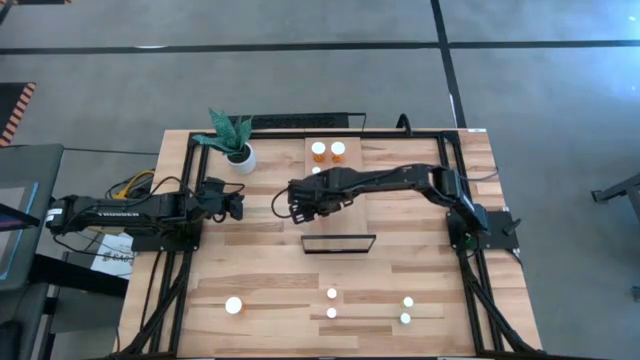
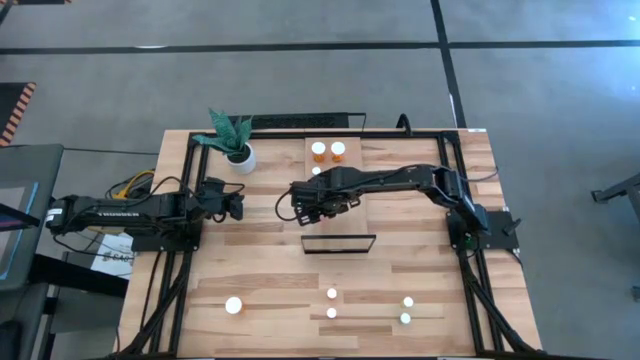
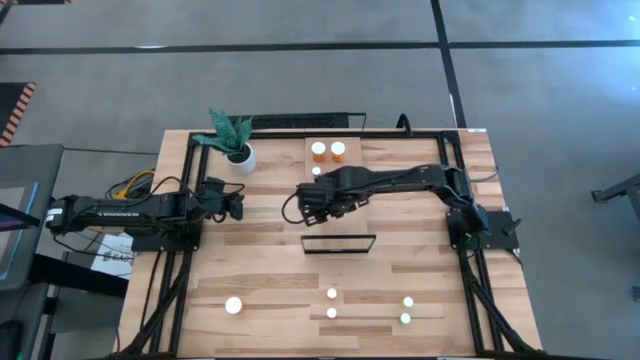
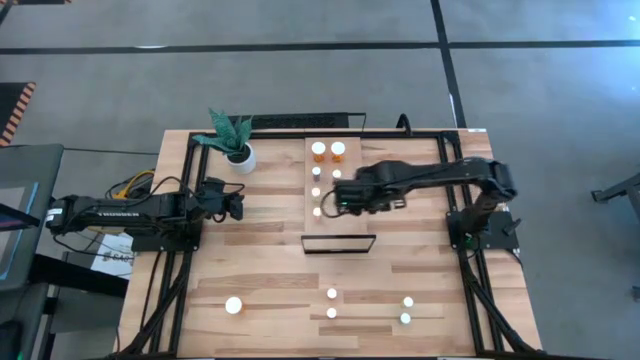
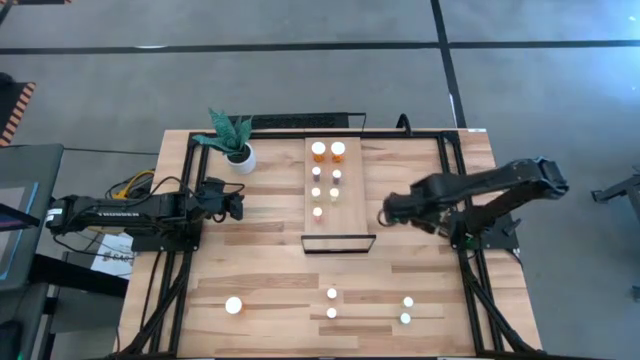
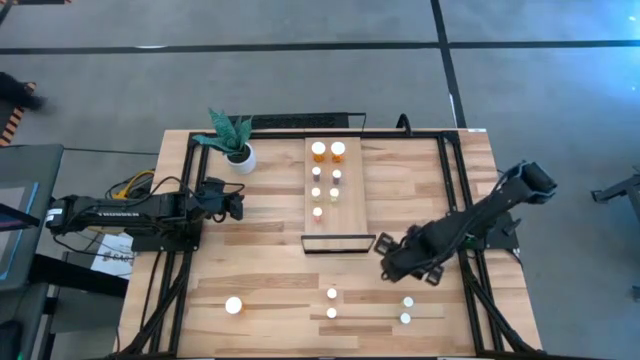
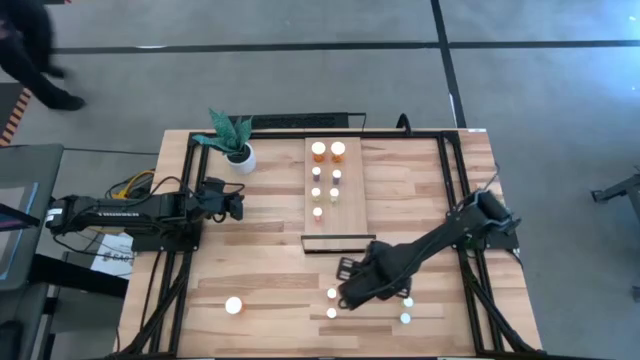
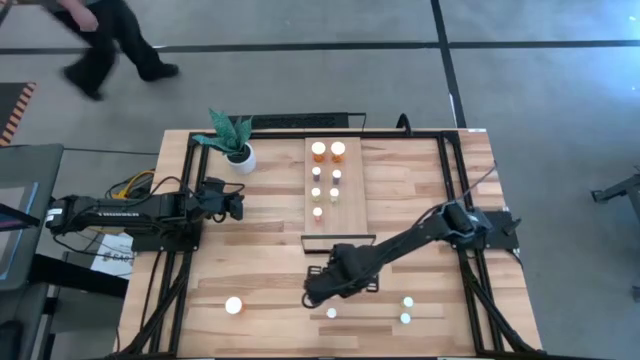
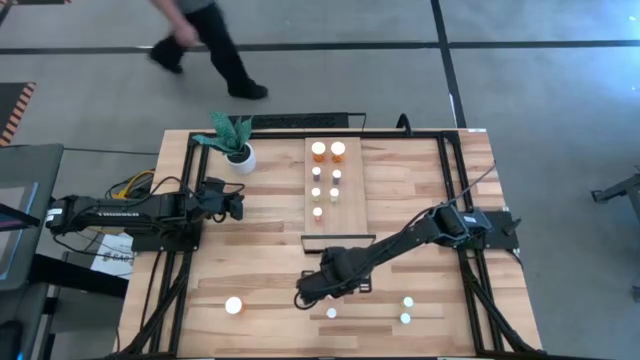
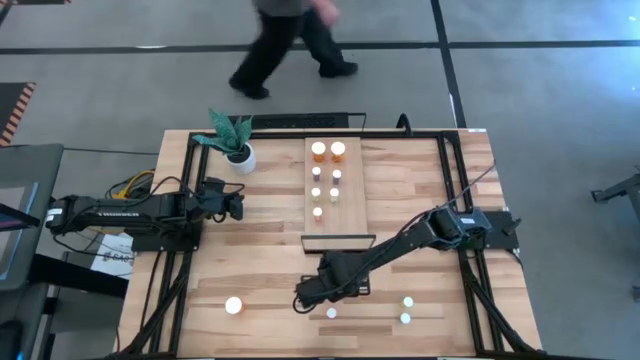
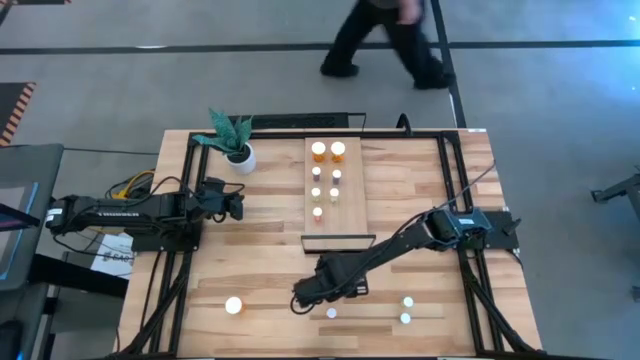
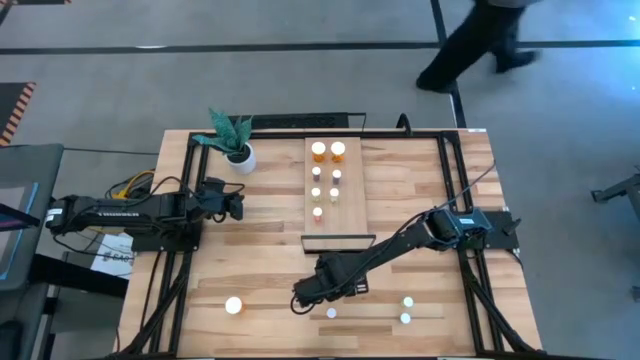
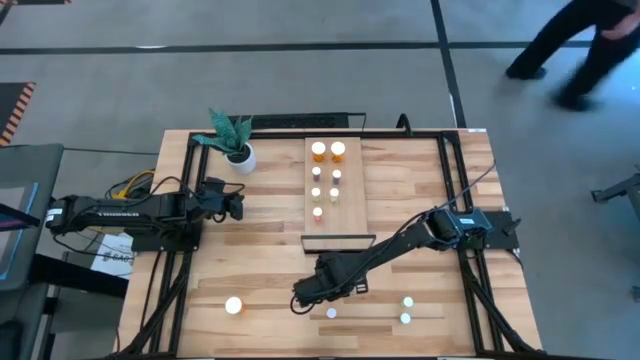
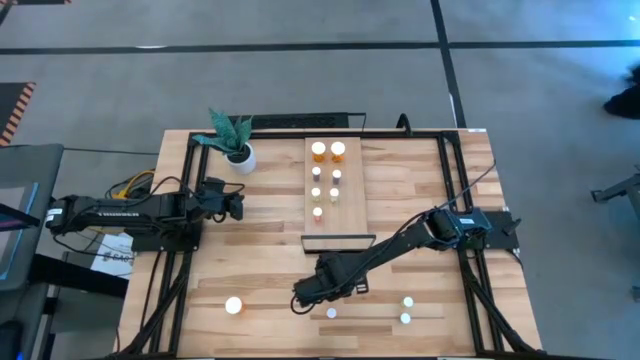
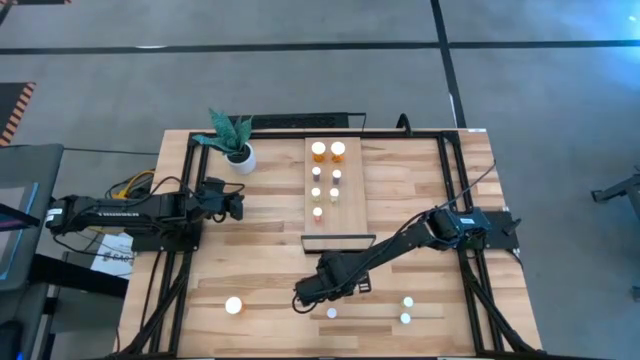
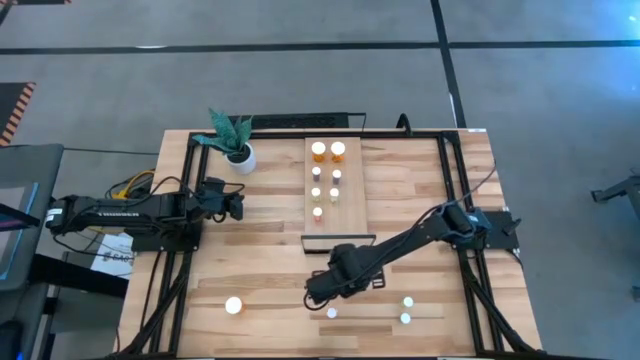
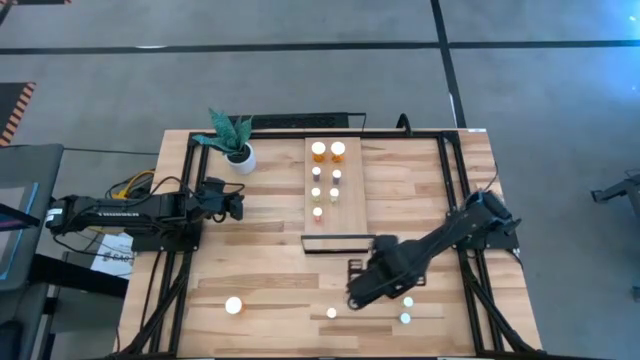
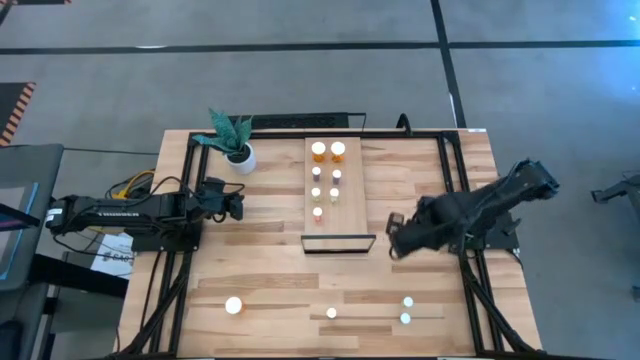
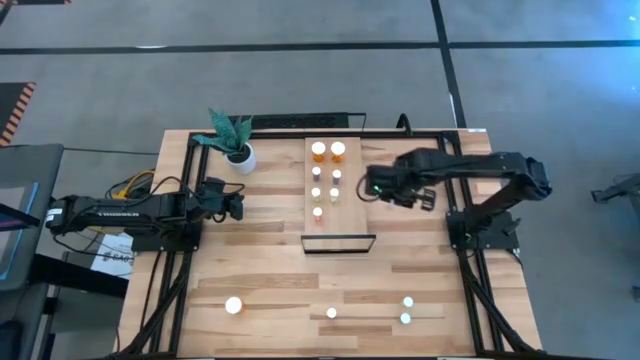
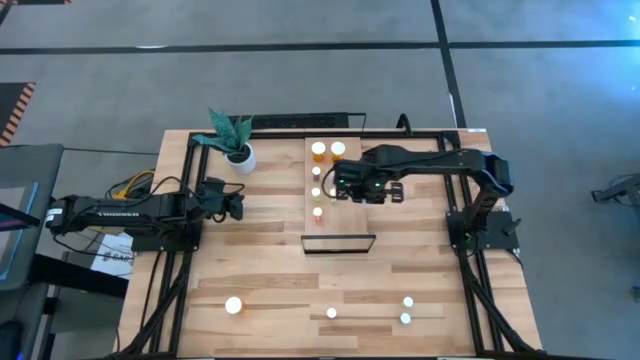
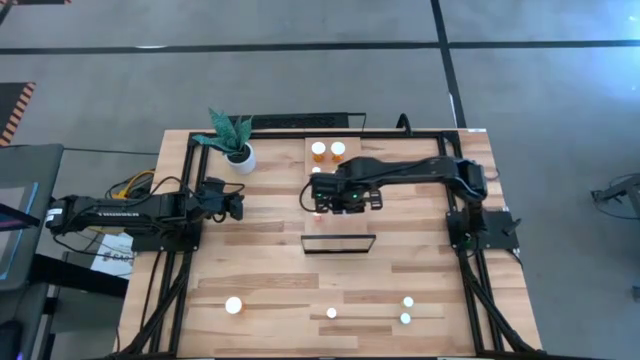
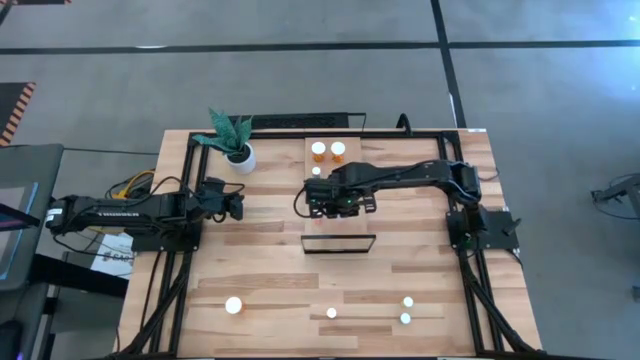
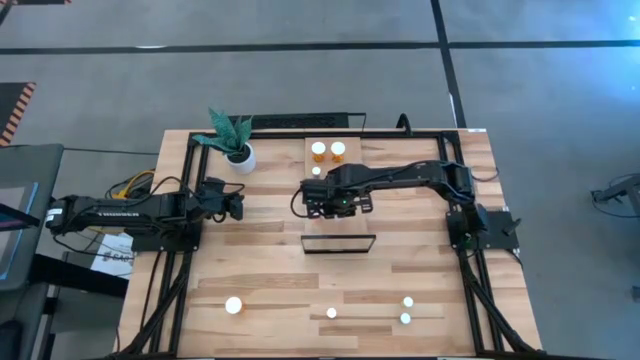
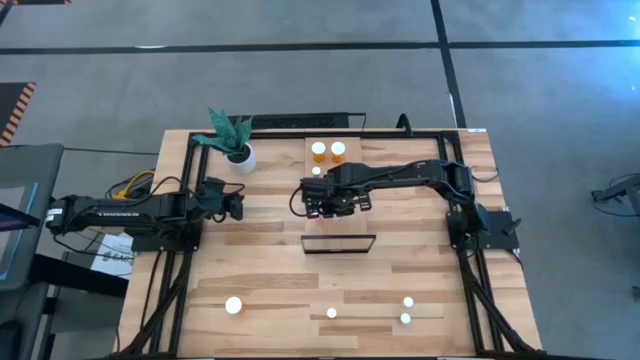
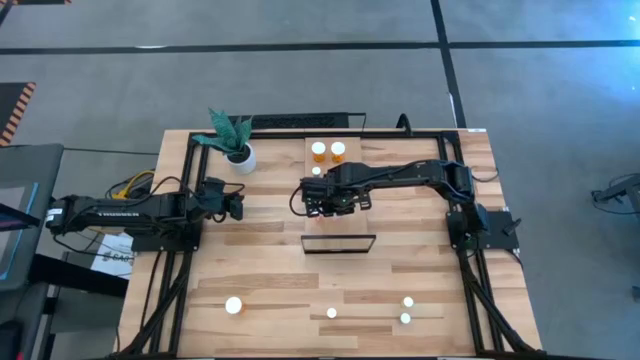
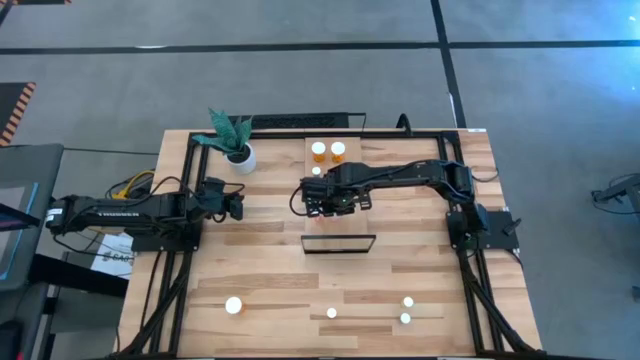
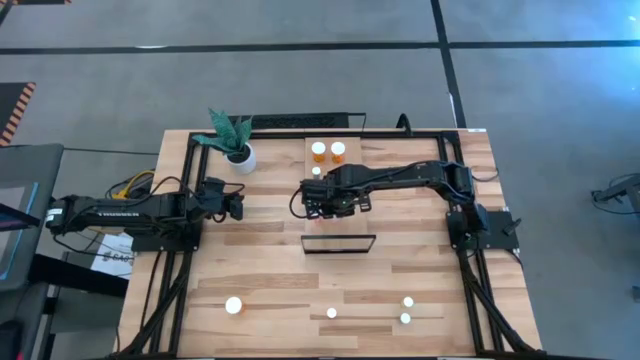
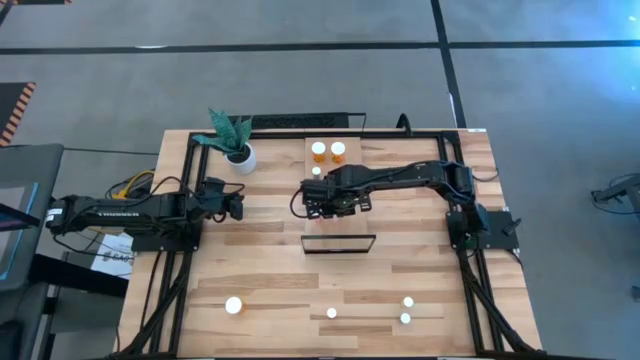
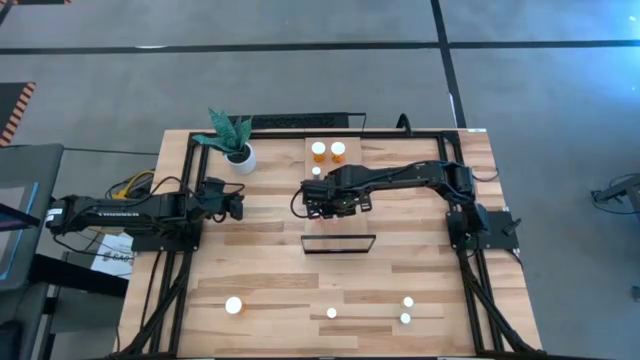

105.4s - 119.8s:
Task: Pick and place medicine bottles onto shelf by color
Put the top pink pill bottle on the shelf aligned with the other pink pill bottle

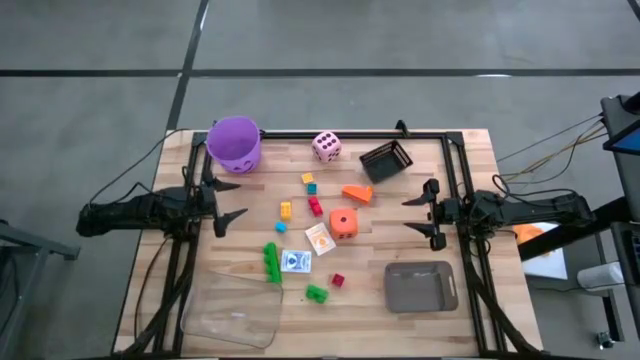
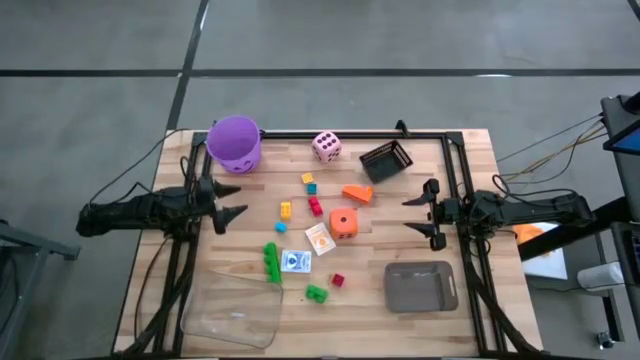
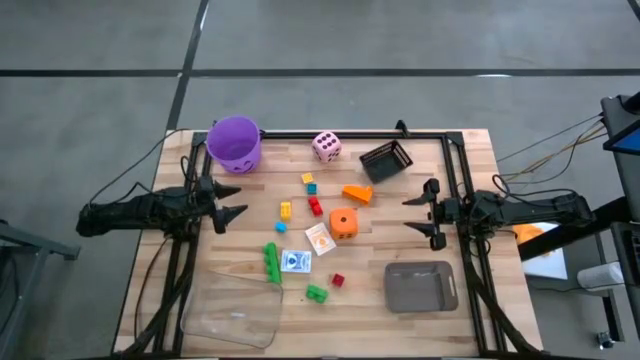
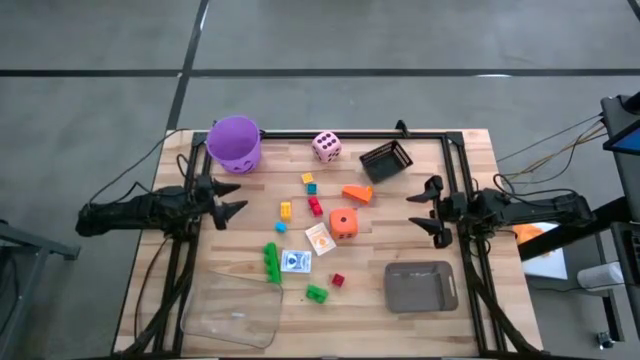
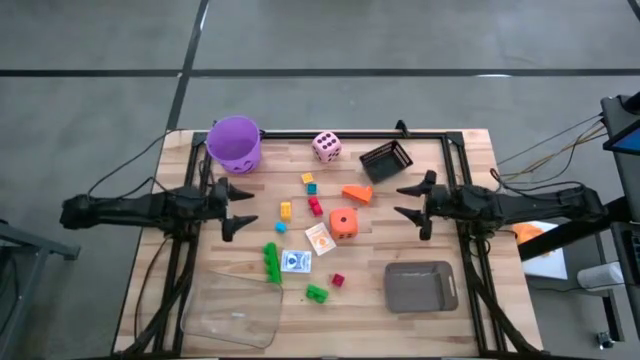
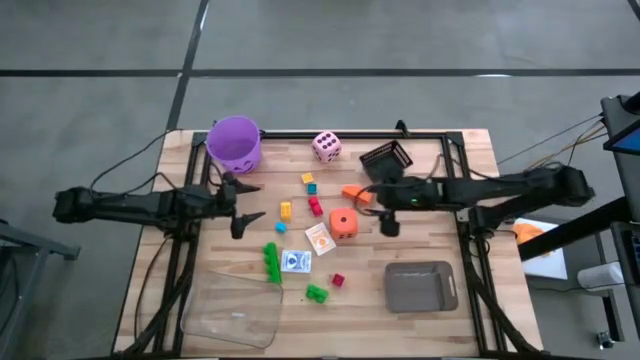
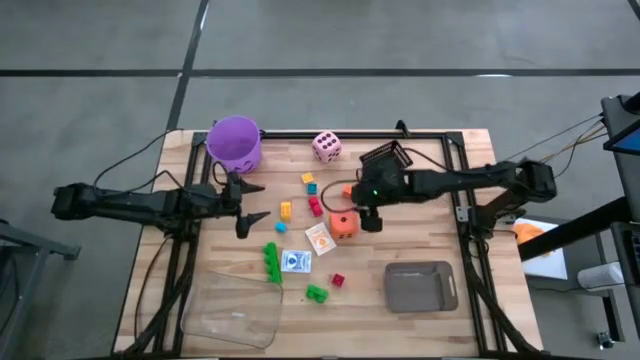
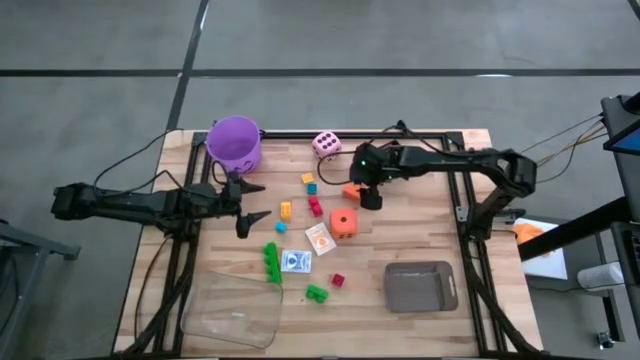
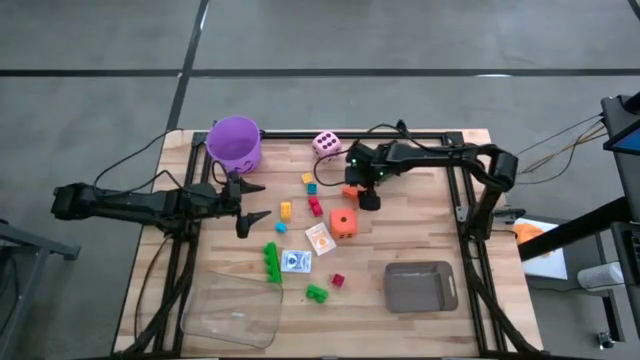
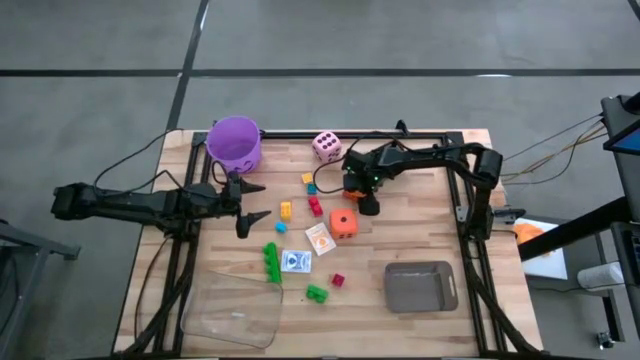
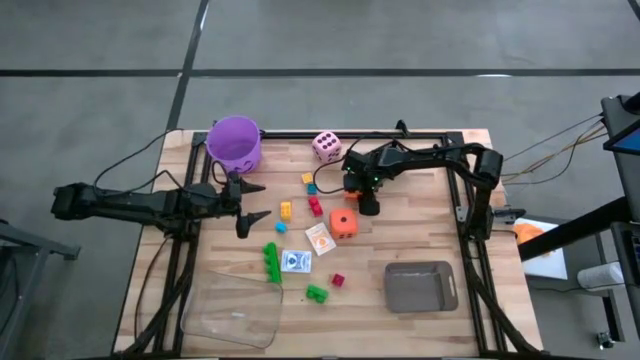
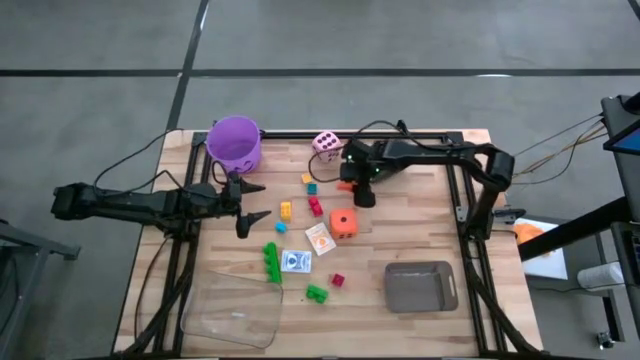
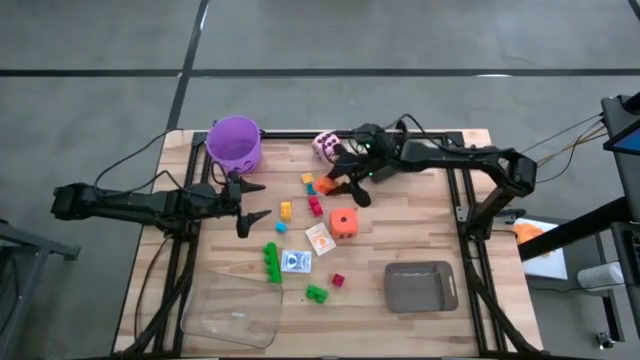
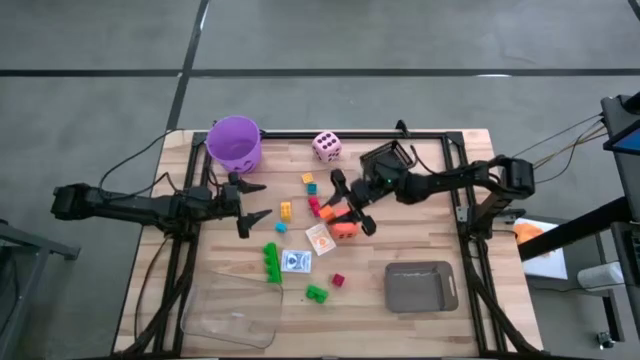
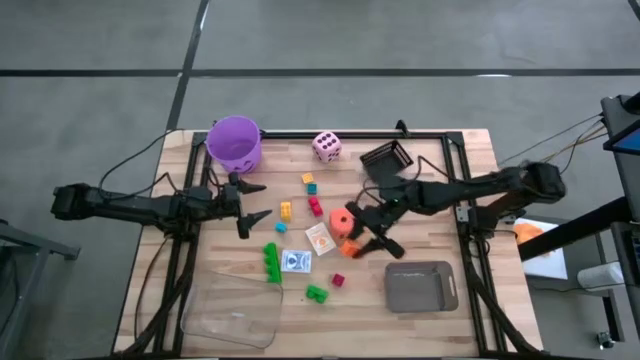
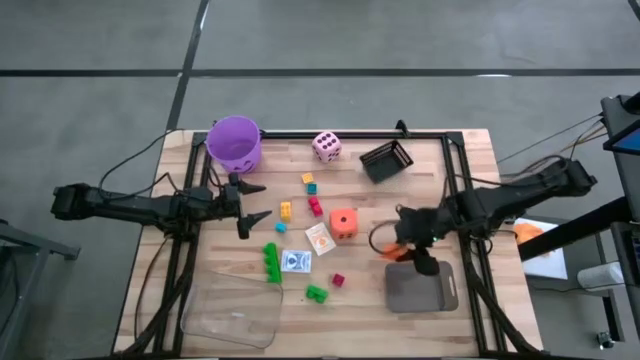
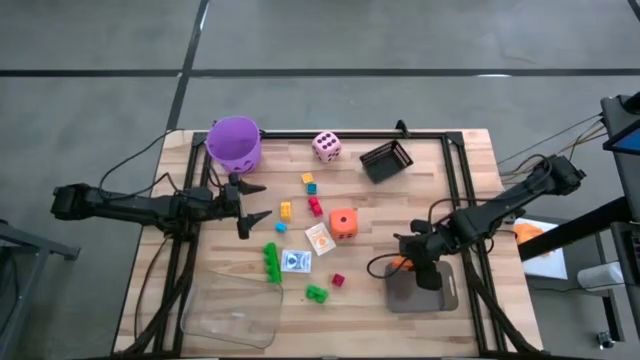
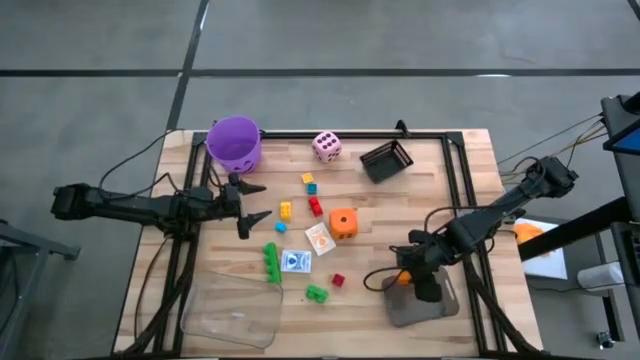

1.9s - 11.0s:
Task: Pick & Place Toys
Put the orange game piece into the black bin
